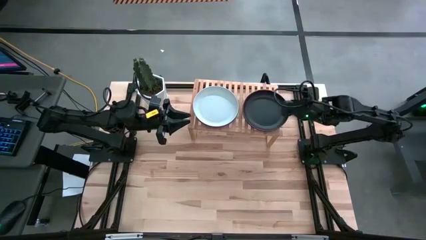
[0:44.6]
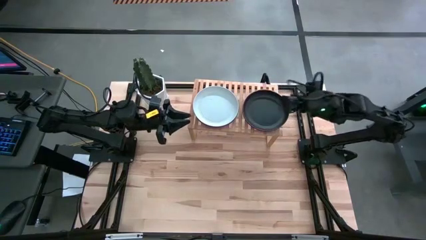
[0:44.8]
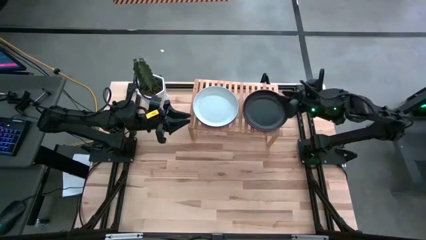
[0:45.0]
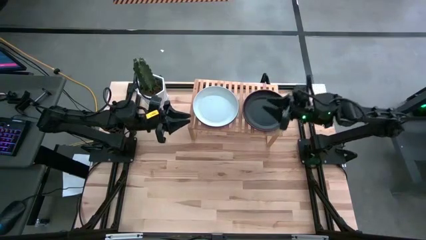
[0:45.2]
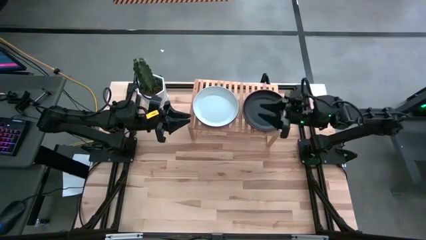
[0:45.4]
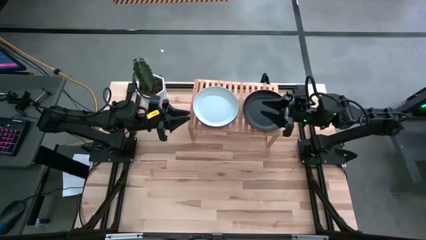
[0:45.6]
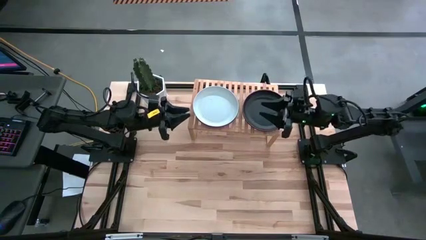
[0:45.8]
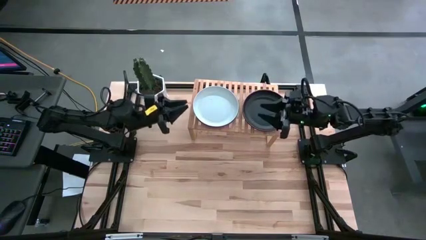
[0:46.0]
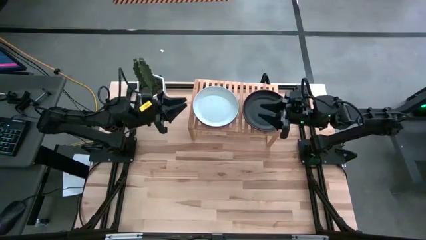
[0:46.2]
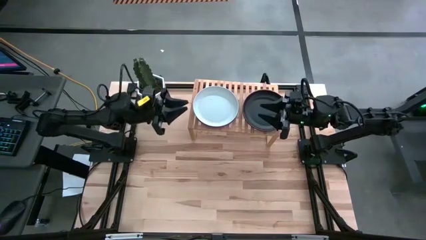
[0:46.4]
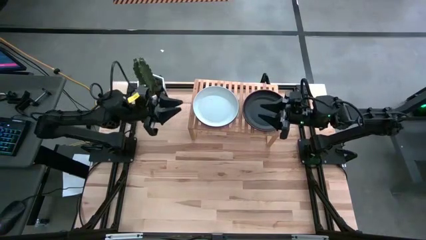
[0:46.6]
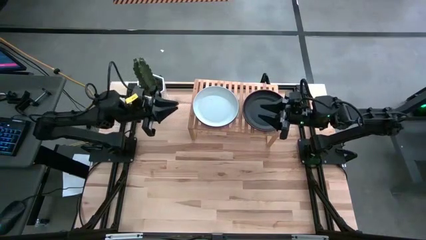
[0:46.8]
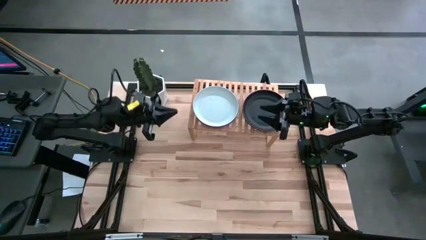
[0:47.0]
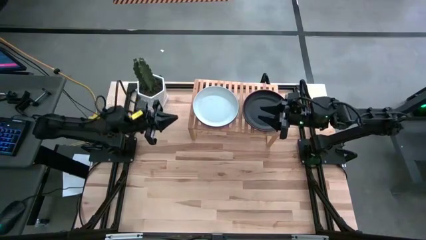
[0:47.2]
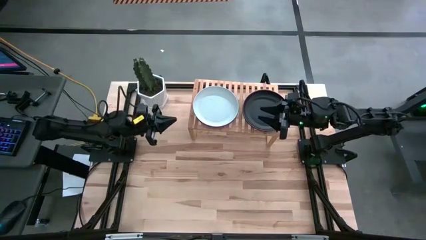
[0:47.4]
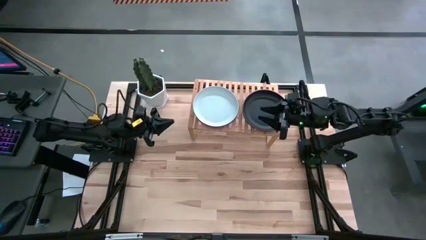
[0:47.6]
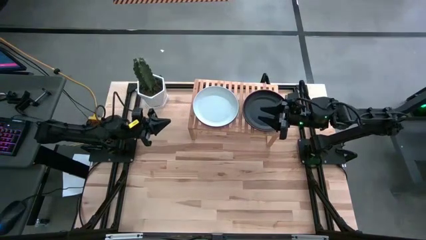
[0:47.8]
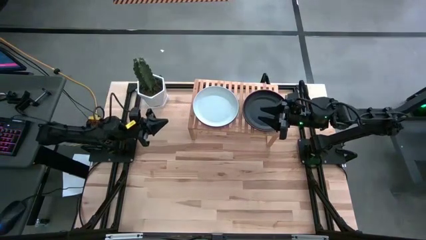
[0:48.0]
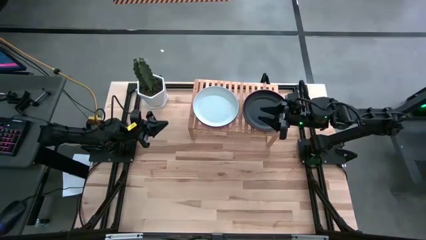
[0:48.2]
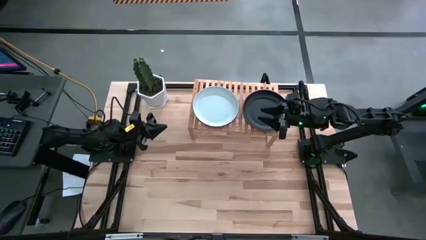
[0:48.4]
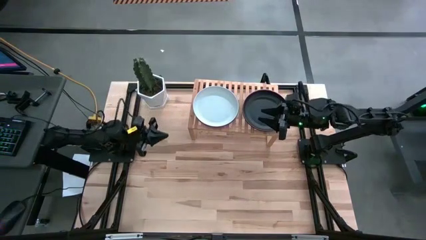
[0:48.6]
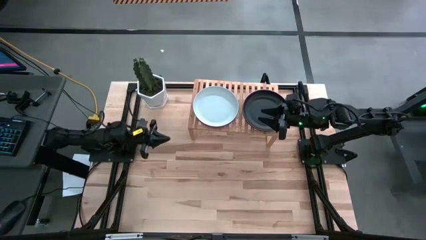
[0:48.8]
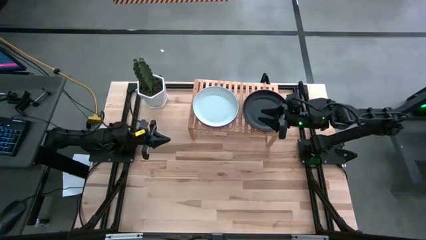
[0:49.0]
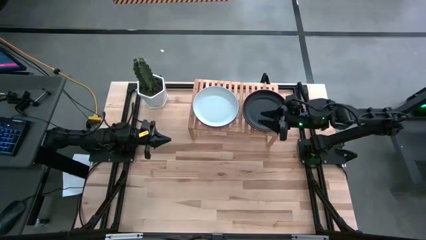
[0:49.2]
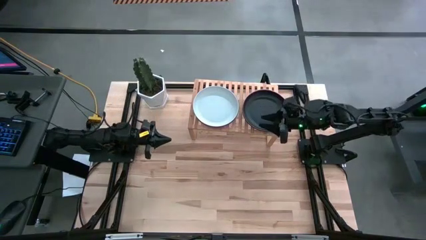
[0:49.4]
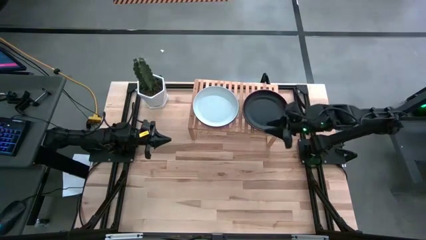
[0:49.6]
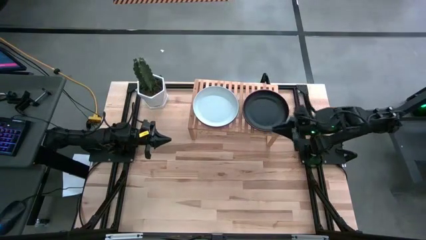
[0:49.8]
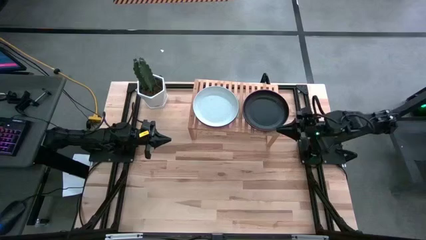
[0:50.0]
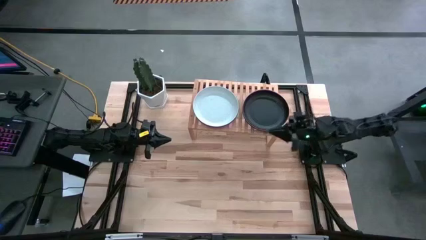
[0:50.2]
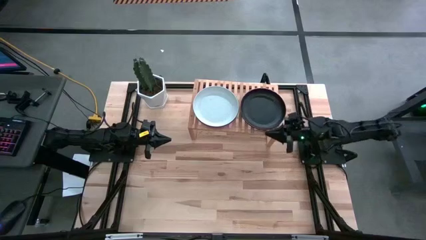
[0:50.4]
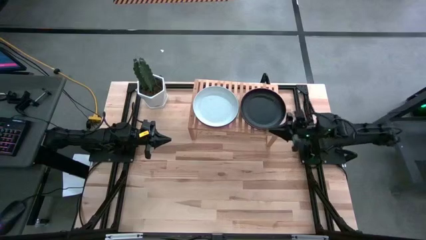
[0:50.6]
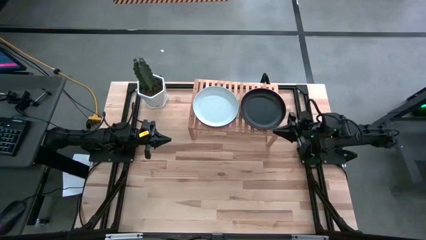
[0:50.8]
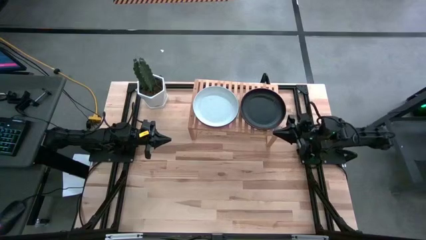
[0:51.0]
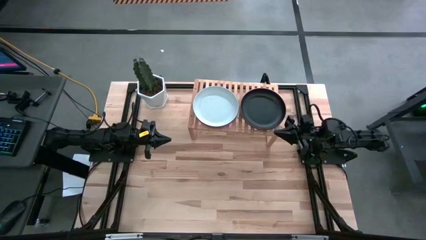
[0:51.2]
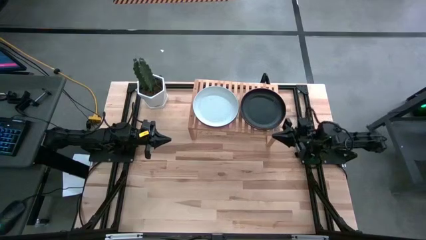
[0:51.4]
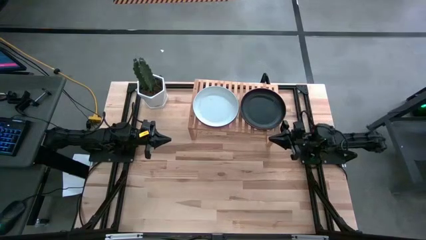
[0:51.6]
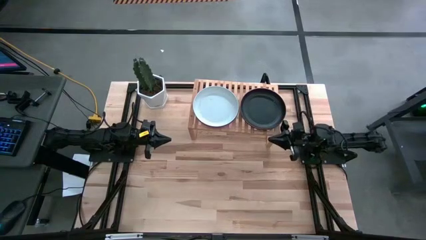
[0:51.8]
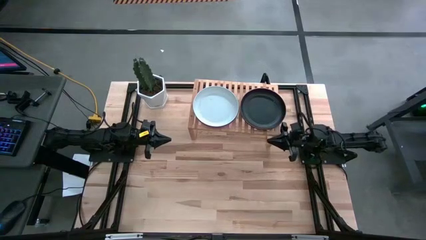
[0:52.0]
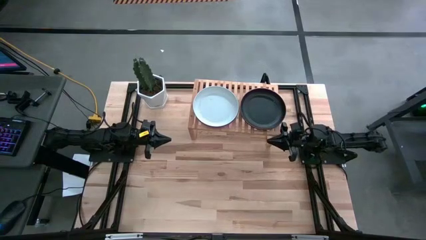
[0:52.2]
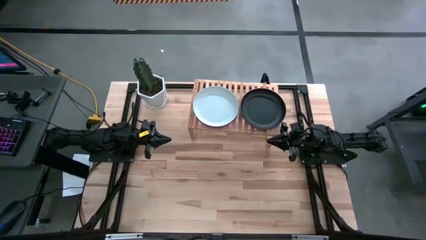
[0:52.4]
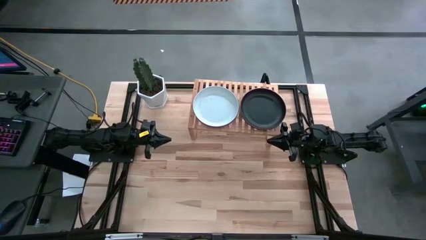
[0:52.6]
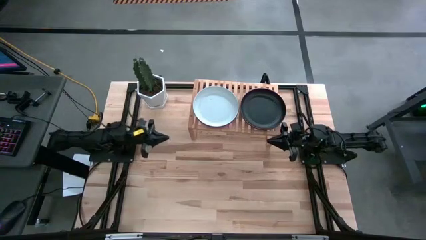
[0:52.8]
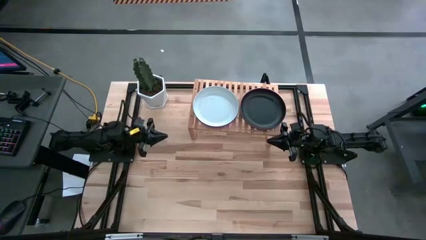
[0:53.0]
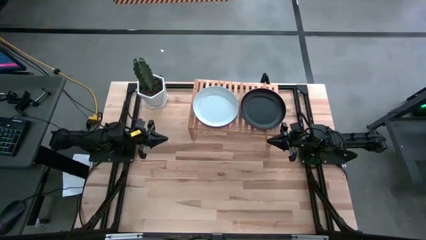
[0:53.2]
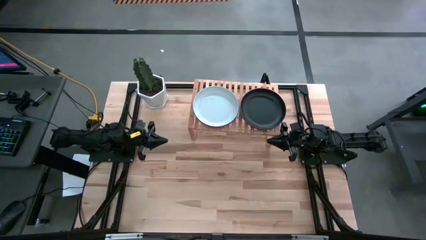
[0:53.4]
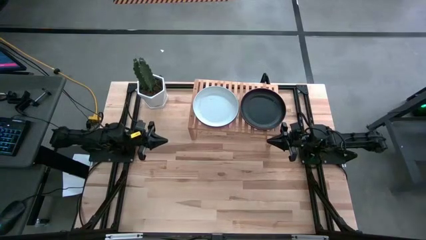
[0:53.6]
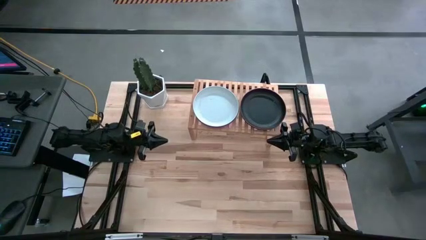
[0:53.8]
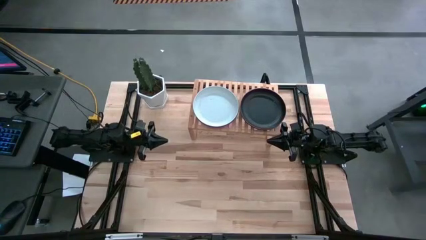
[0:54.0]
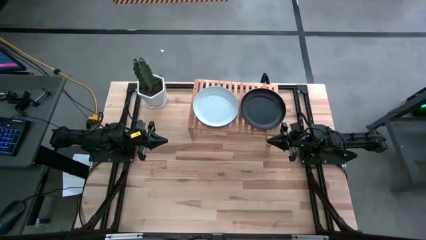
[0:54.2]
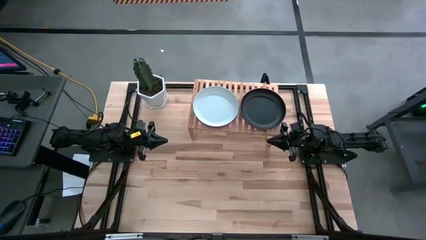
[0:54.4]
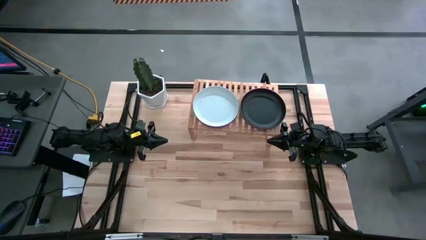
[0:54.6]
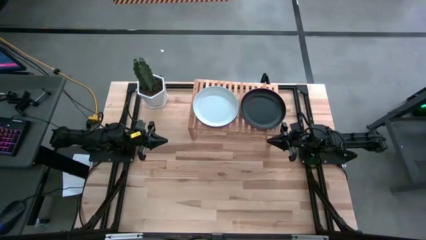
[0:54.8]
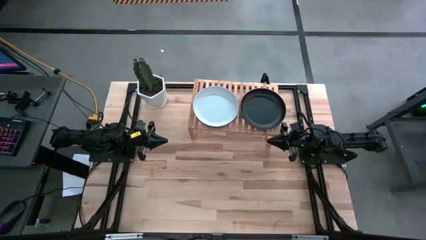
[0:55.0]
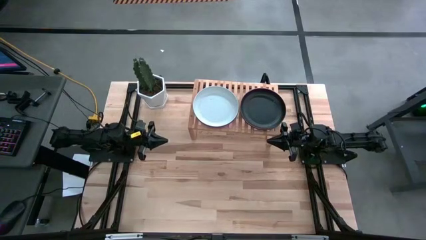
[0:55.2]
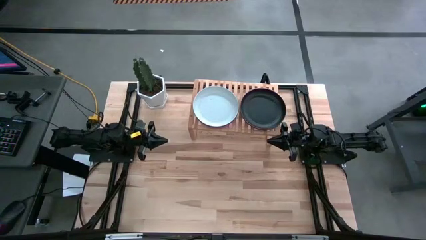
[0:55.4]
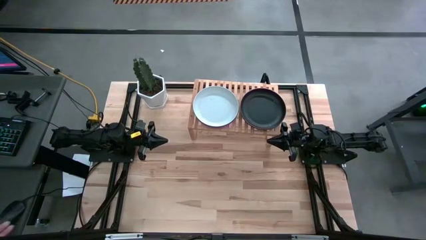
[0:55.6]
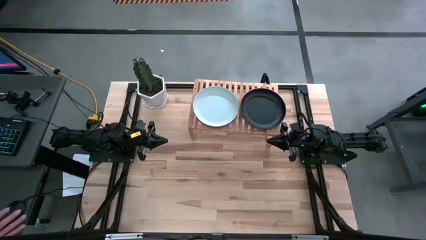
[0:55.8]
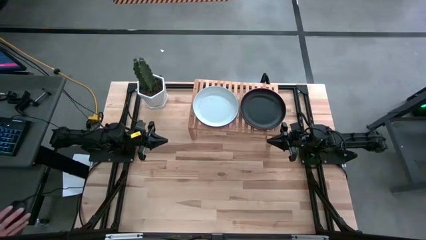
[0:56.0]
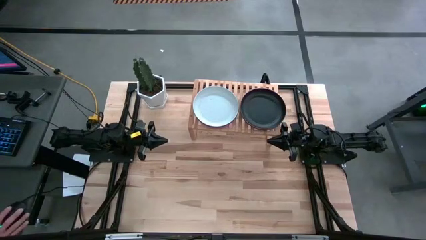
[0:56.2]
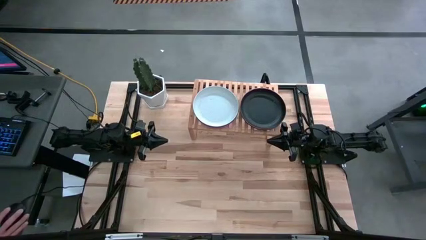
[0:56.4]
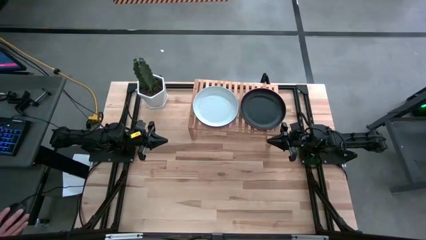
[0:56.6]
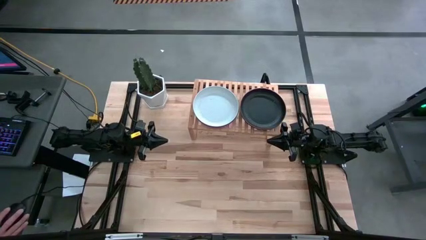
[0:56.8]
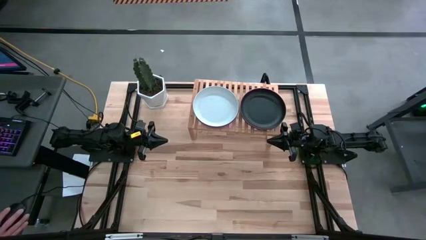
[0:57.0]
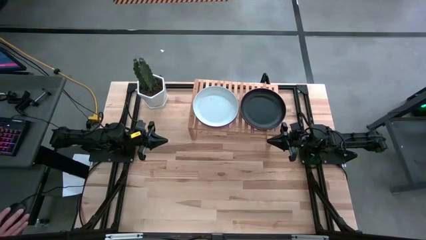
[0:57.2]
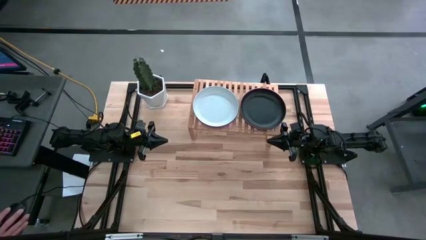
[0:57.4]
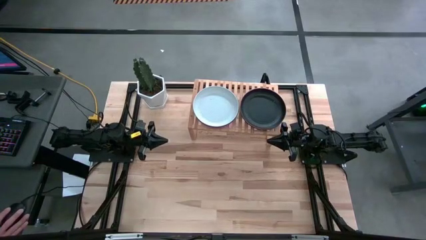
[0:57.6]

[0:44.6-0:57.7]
Task: Place and stack plates onto a shelf
Return to Home Position

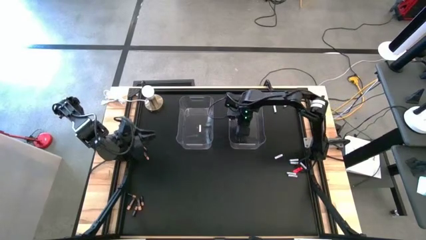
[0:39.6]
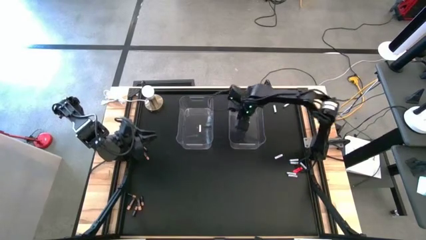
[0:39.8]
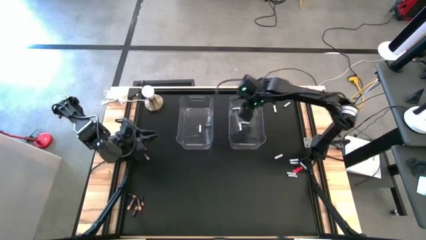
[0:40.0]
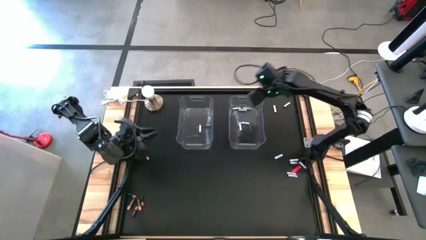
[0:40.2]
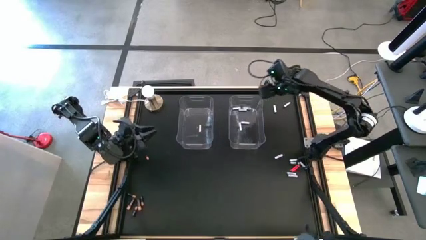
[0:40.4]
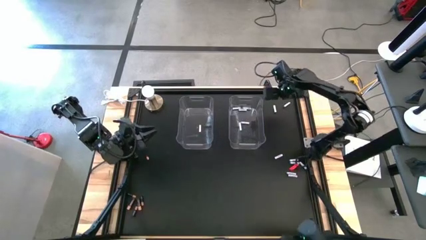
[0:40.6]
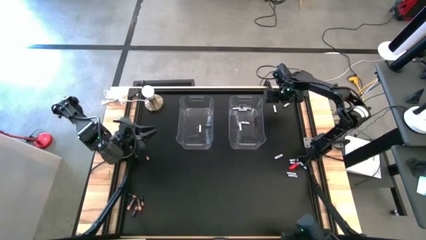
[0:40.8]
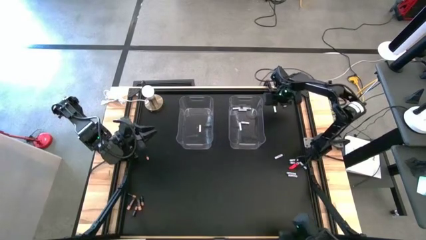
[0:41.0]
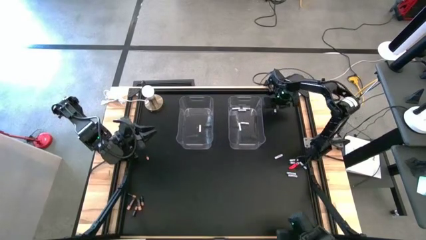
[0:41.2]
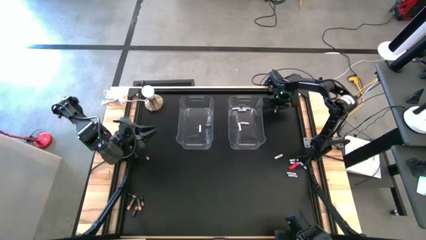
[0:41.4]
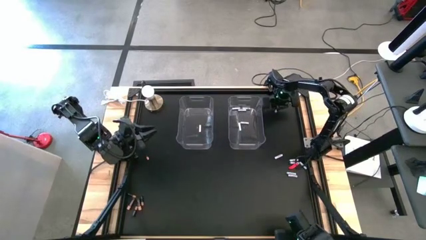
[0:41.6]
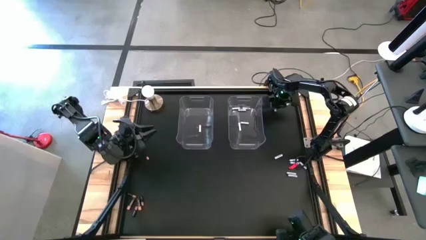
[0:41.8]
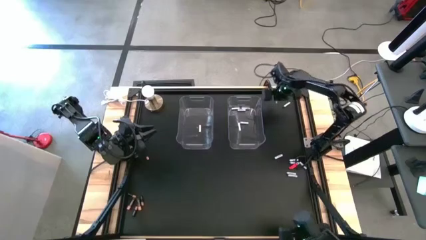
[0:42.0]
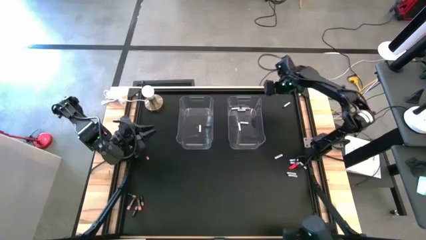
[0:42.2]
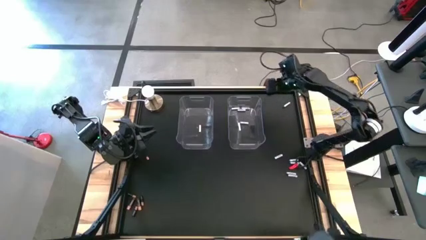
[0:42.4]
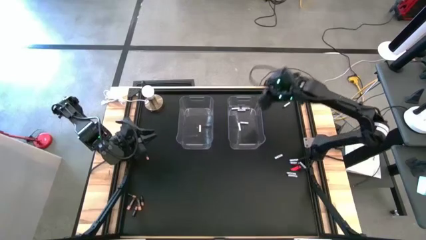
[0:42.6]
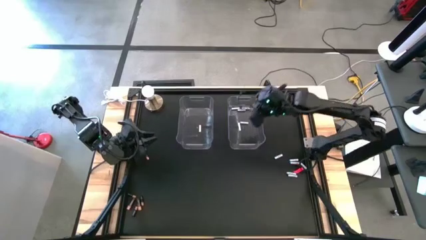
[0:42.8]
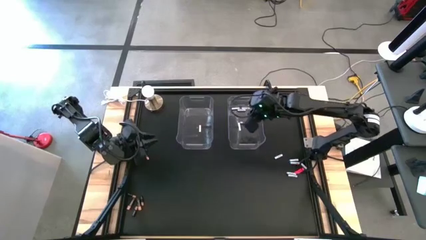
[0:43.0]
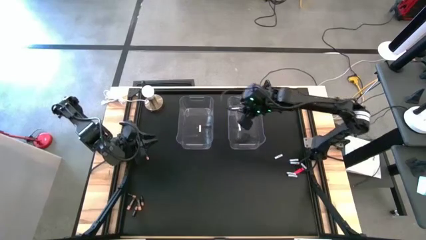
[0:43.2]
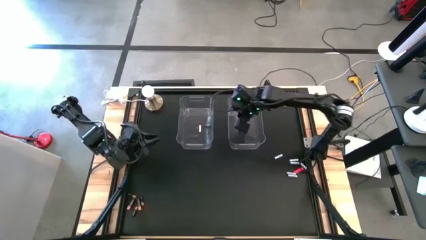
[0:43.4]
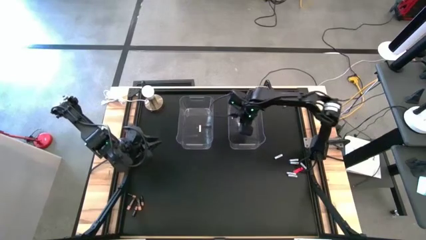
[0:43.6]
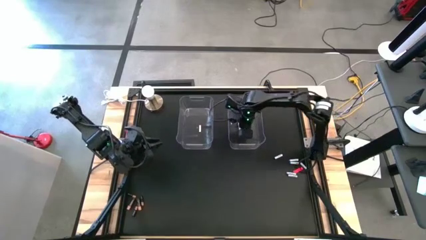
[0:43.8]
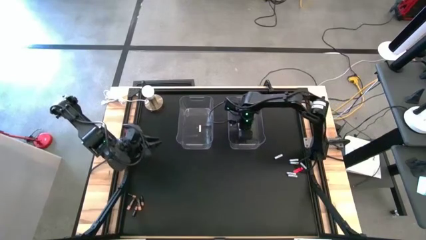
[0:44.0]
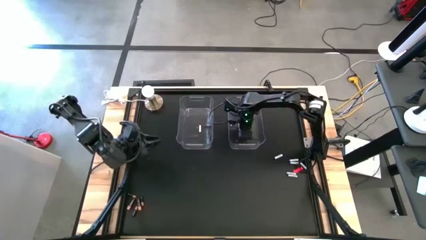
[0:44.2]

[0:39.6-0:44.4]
Task: Sort batteries
Put the white battery into the right transparent bin
